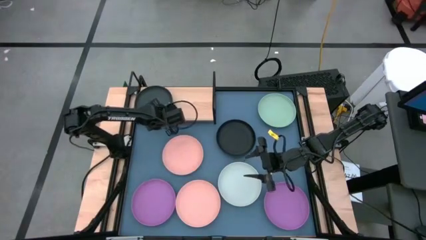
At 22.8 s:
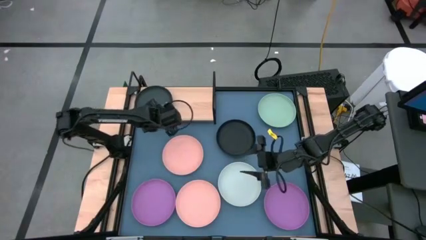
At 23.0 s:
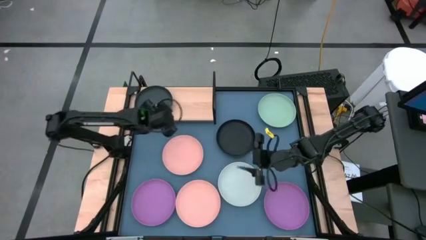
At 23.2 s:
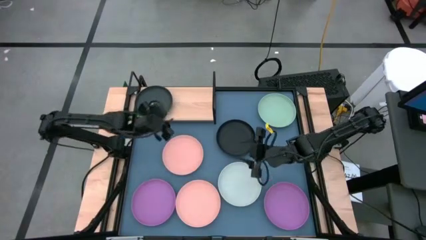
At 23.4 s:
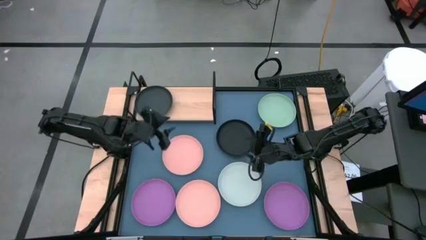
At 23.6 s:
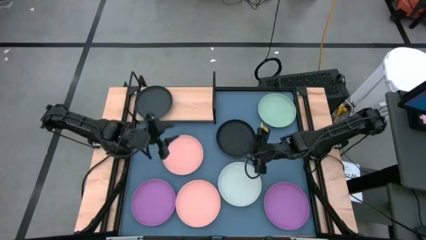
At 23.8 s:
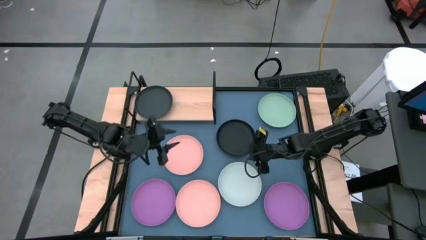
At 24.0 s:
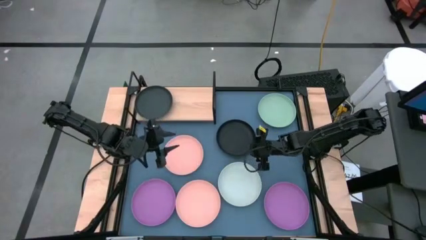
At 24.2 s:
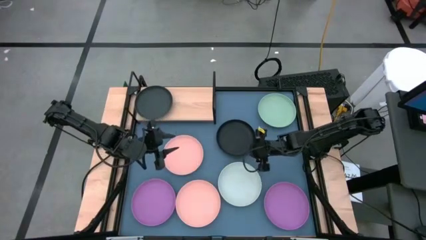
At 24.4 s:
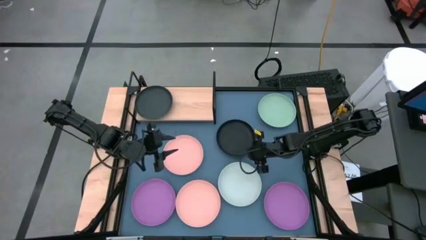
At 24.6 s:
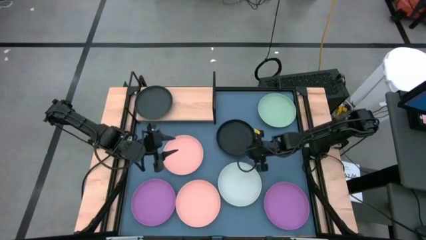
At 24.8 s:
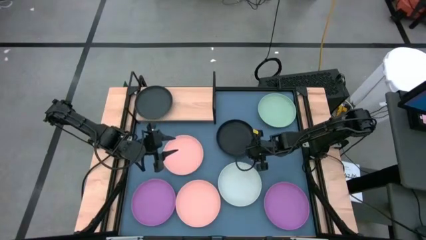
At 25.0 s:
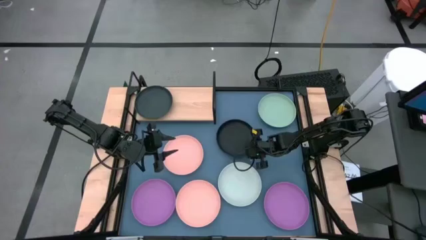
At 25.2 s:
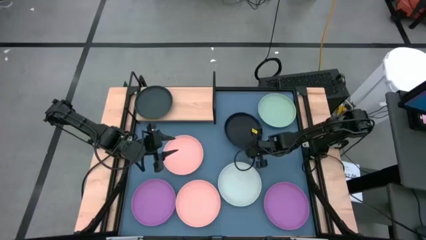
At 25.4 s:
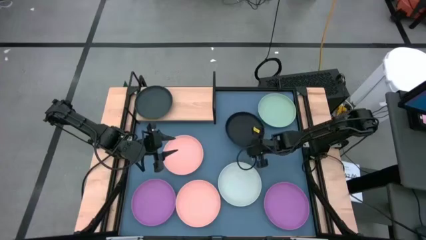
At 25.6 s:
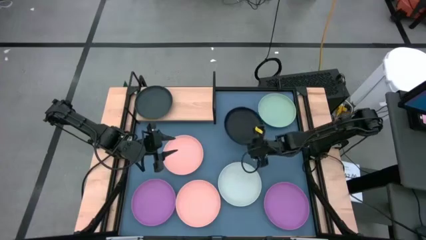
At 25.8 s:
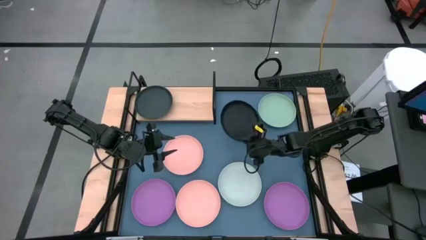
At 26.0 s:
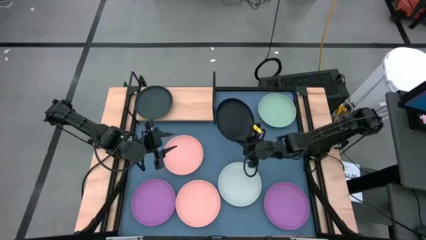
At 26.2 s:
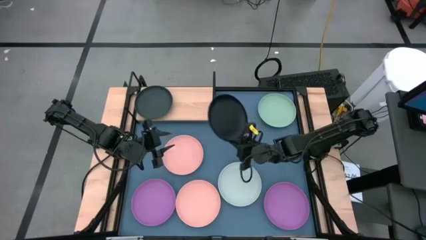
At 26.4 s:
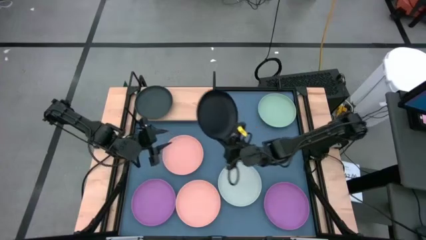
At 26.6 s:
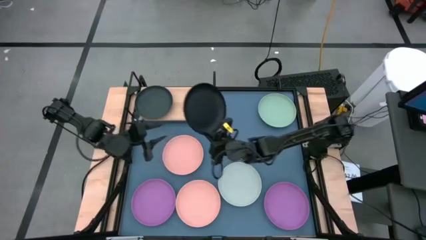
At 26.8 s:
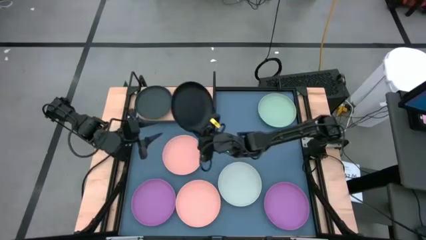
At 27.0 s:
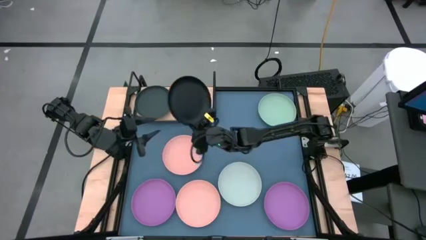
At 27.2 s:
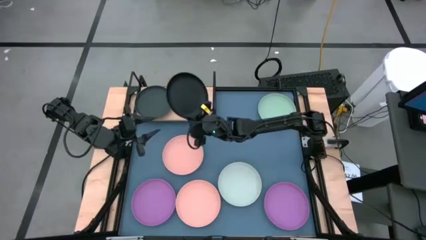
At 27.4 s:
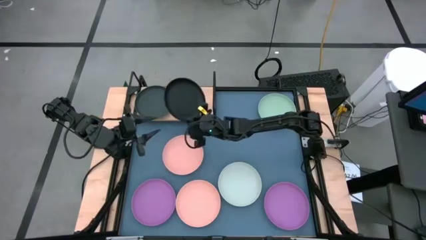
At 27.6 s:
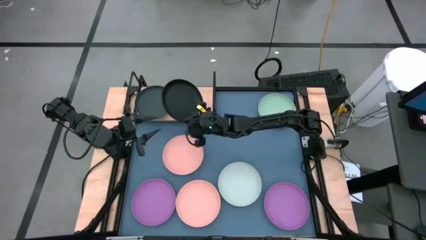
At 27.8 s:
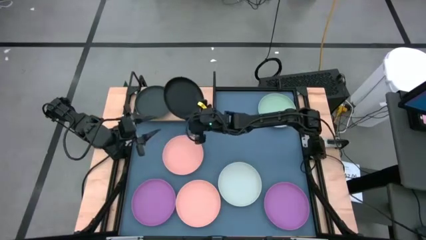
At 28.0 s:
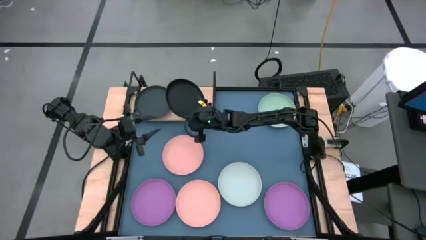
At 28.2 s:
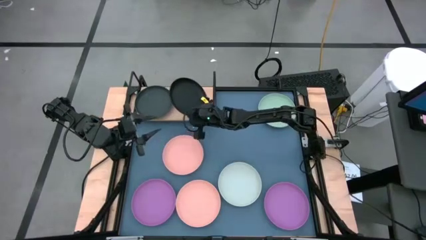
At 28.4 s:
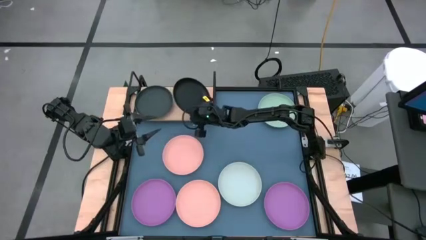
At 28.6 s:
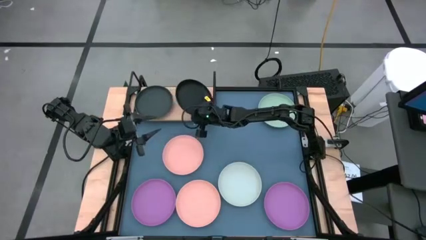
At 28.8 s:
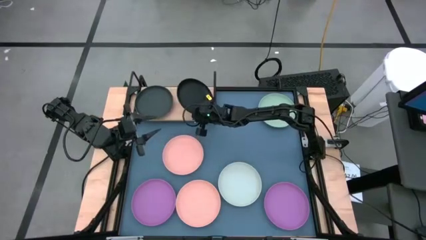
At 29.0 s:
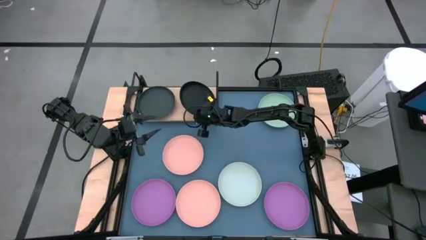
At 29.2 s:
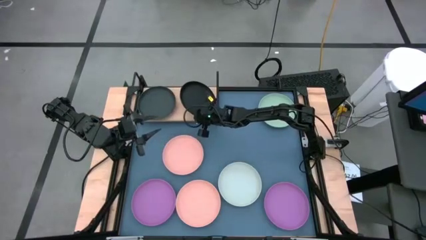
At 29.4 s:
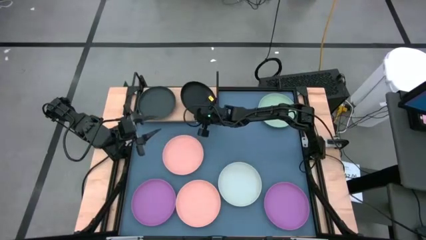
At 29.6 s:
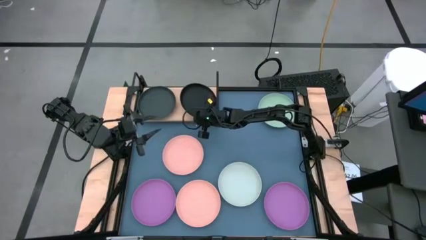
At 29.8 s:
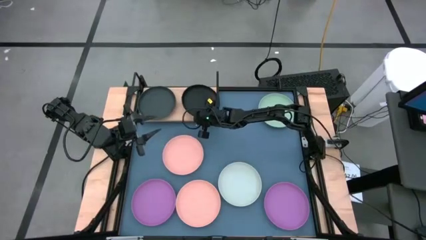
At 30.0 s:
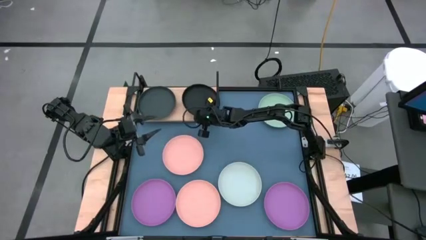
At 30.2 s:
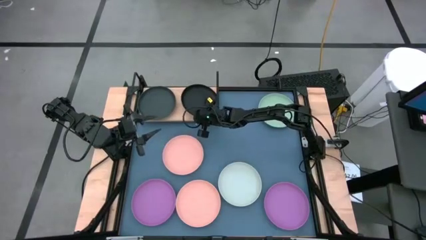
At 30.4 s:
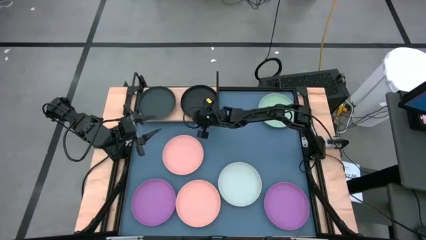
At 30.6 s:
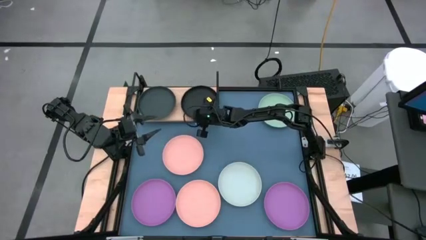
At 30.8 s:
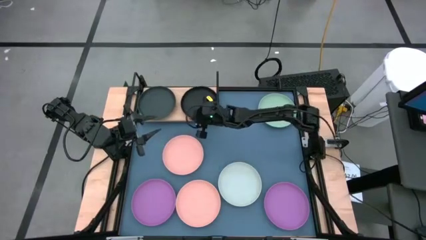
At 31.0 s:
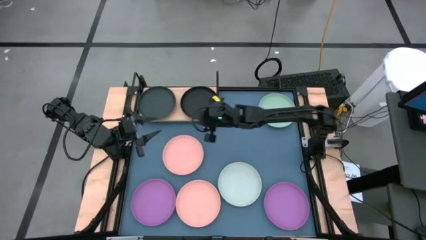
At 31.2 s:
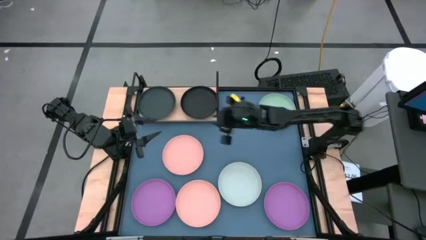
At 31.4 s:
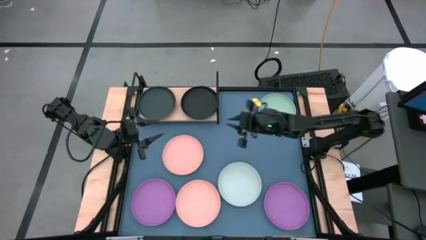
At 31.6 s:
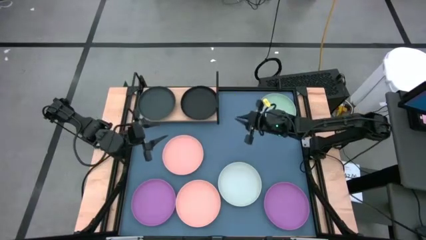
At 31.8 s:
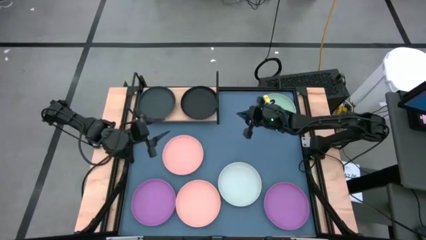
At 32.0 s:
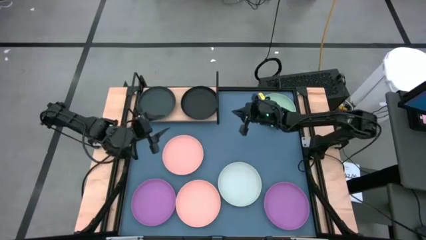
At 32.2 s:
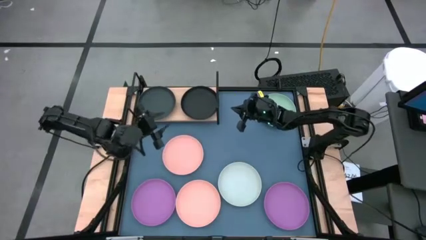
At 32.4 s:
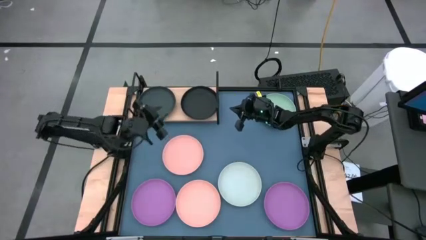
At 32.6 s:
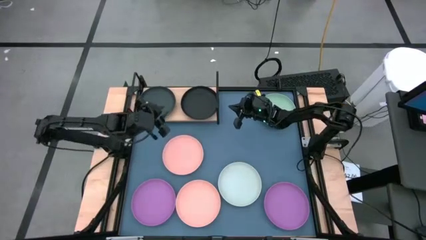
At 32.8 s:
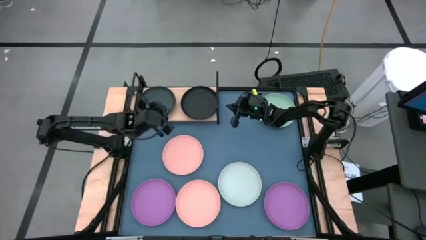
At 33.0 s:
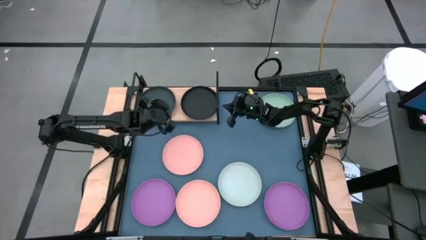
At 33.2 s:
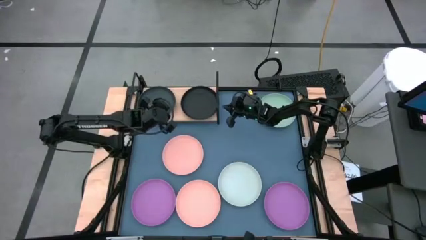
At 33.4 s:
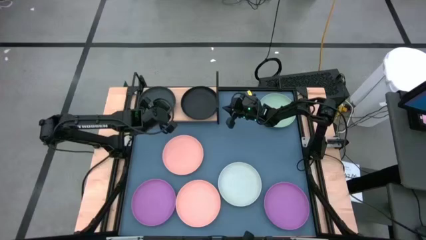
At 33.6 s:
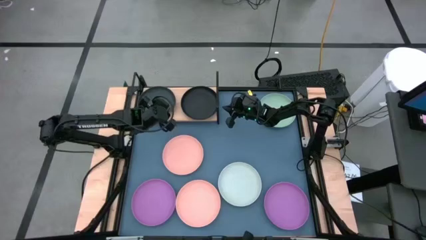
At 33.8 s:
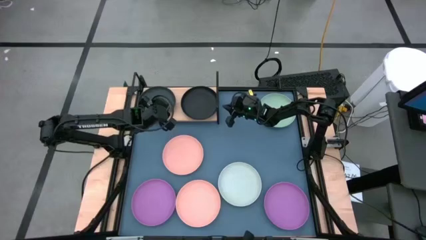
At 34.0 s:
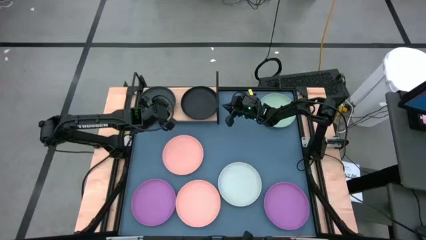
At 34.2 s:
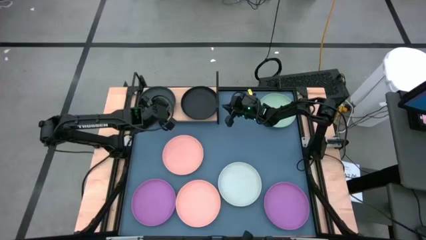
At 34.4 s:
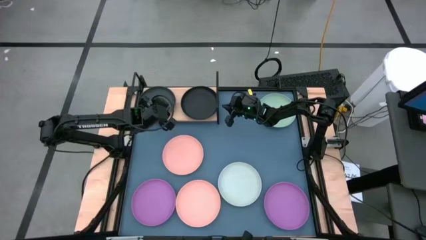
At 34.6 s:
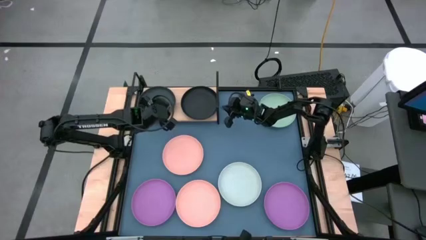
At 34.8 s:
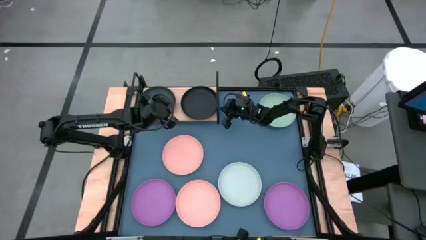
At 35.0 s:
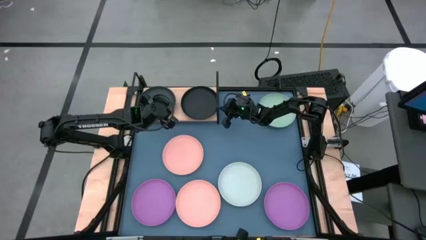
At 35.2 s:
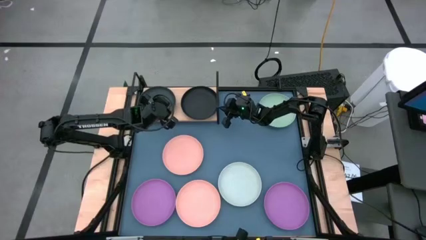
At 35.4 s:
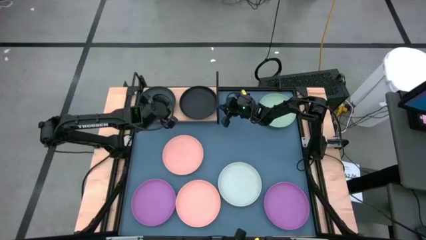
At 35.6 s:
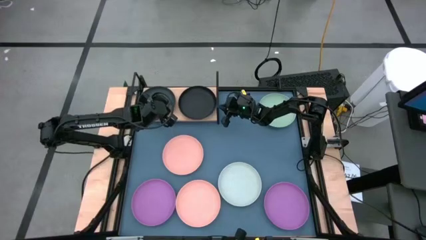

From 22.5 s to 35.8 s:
Task: Place and stack plates onto a shelf
Put the black plate on the shelf

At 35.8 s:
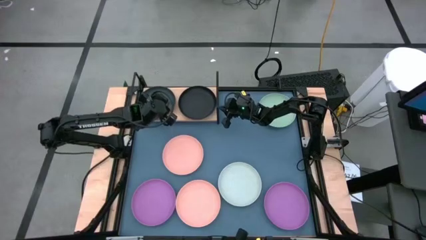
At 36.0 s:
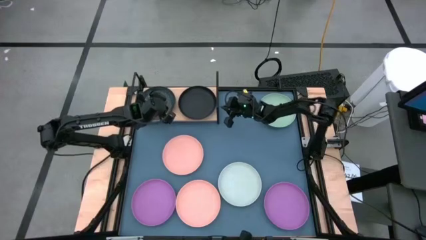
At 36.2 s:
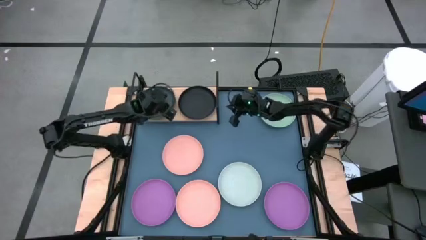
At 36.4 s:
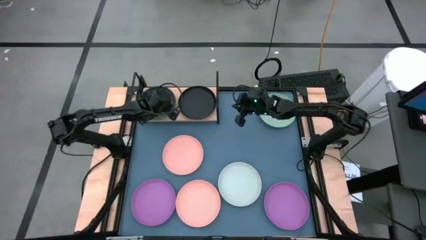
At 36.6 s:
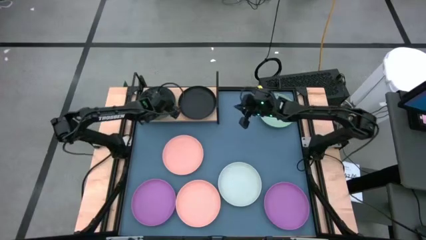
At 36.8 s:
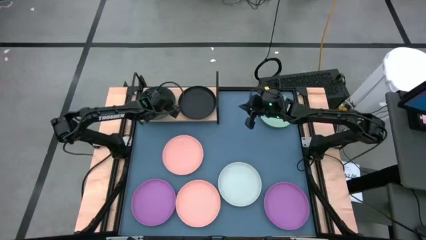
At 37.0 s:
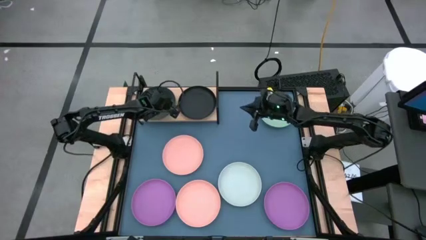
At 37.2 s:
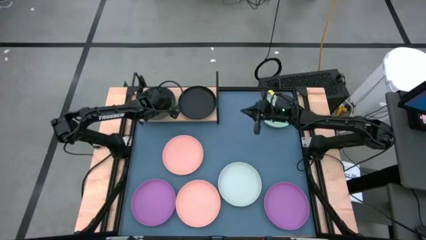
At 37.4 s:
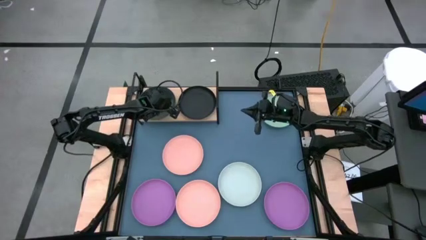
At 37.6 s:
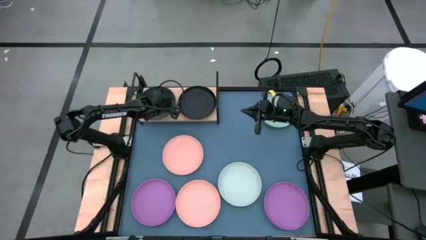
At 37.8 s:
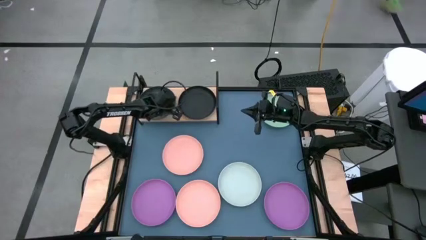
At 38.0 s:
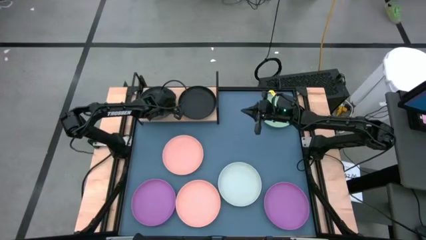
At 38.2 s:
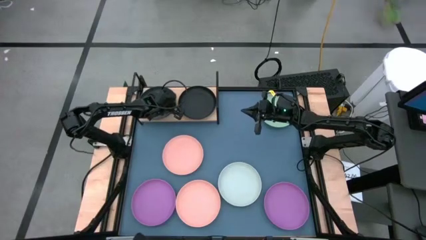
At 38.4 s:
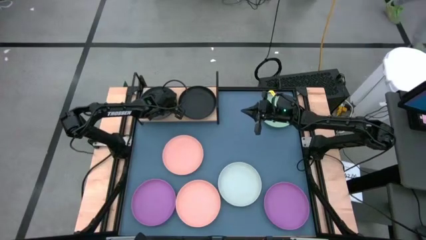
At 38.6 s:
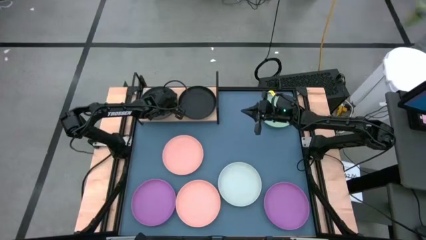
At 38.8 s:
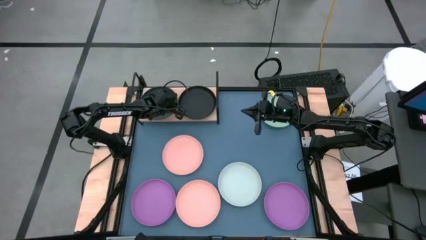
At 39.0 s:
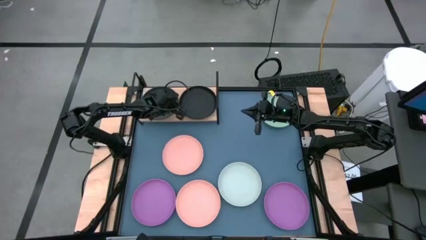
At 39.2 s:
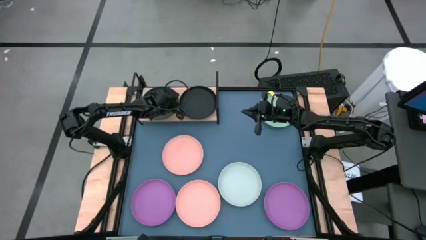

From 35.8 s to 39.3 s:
Adjust the black plate
